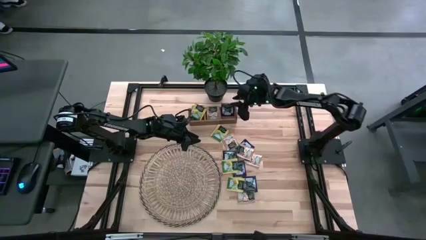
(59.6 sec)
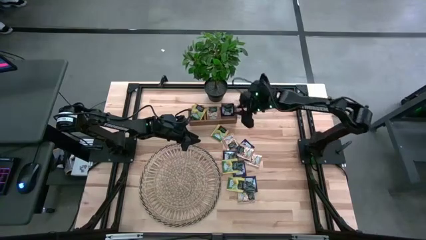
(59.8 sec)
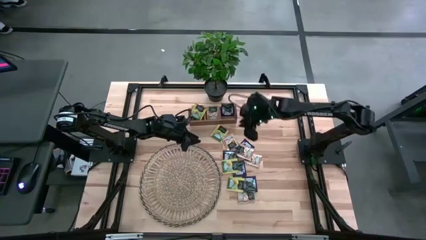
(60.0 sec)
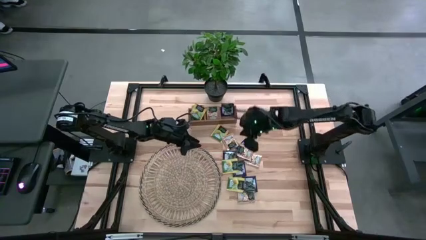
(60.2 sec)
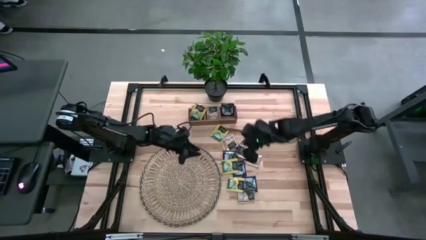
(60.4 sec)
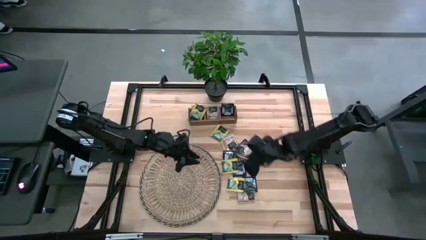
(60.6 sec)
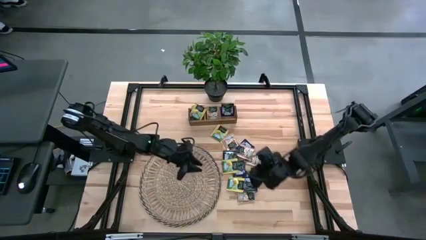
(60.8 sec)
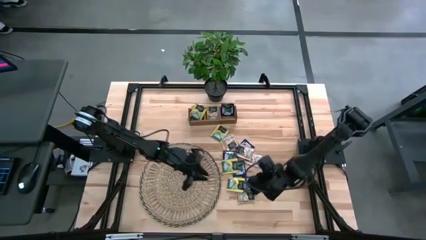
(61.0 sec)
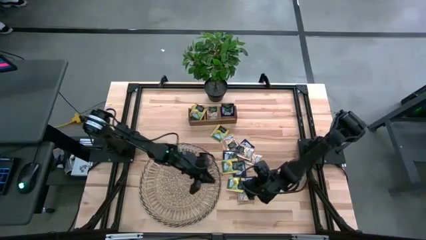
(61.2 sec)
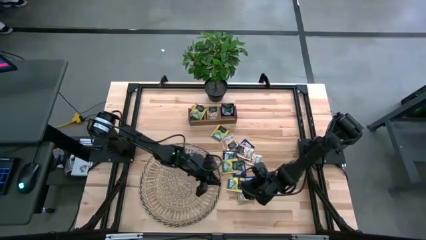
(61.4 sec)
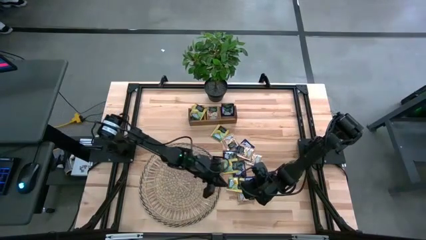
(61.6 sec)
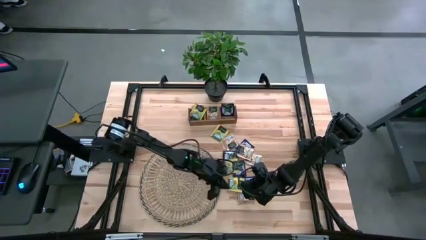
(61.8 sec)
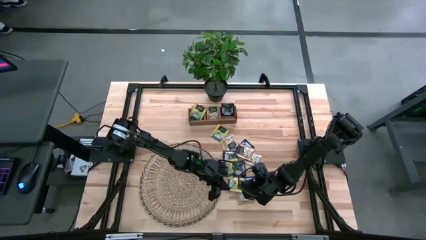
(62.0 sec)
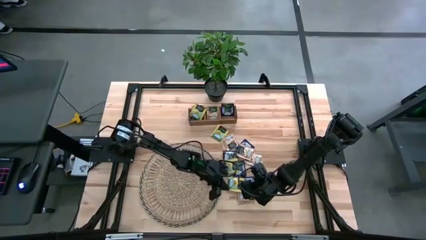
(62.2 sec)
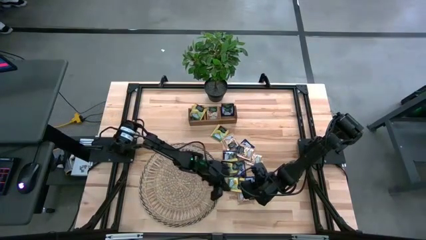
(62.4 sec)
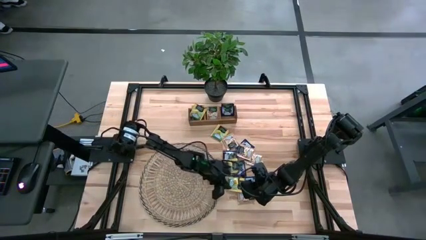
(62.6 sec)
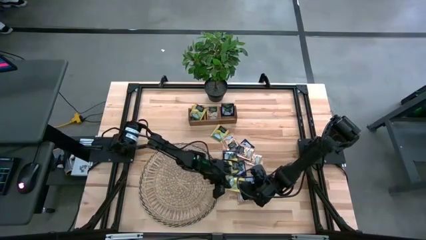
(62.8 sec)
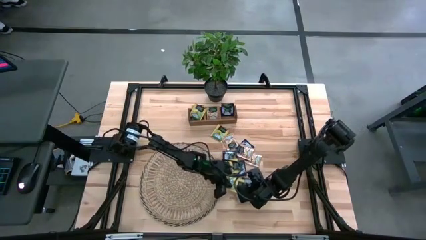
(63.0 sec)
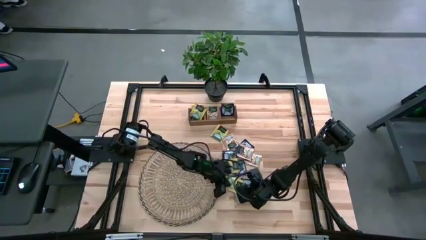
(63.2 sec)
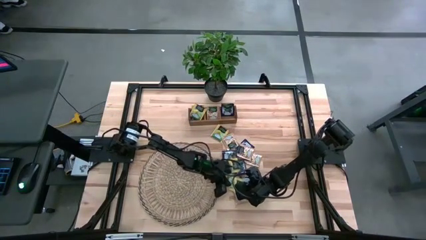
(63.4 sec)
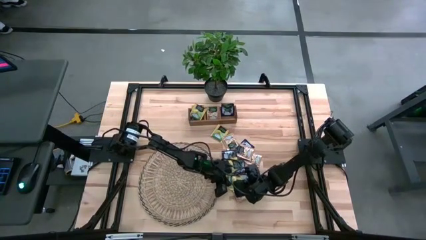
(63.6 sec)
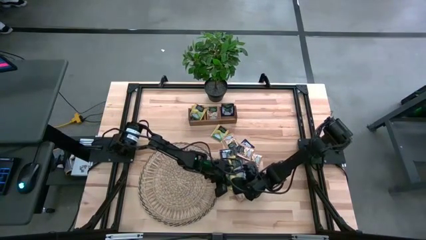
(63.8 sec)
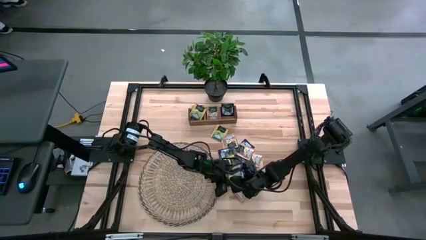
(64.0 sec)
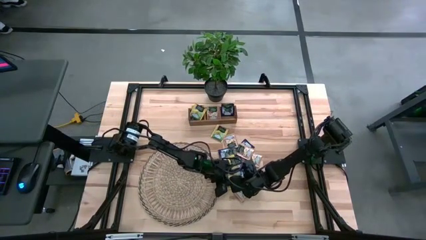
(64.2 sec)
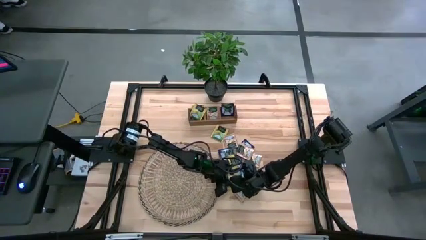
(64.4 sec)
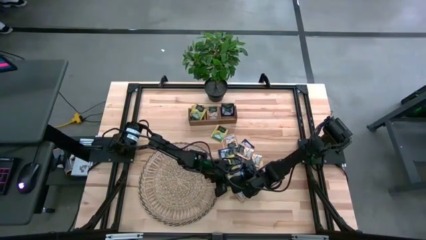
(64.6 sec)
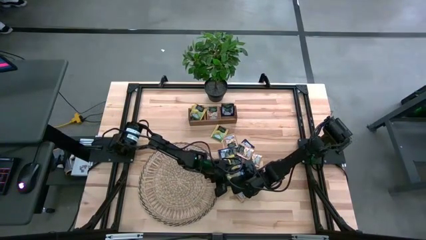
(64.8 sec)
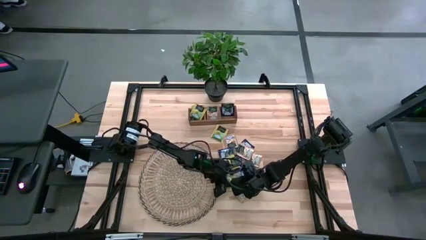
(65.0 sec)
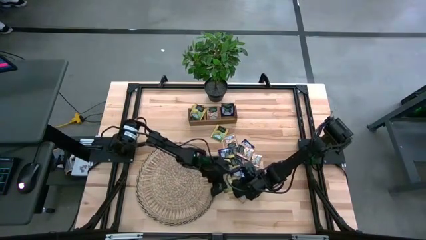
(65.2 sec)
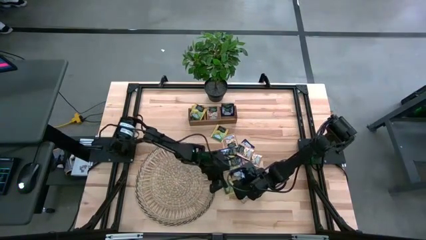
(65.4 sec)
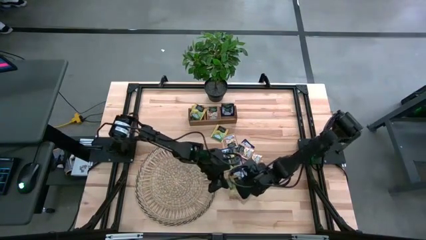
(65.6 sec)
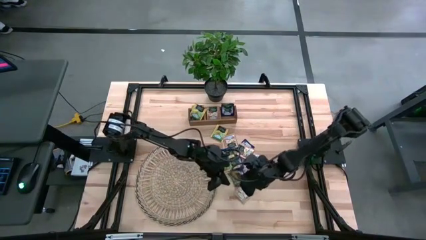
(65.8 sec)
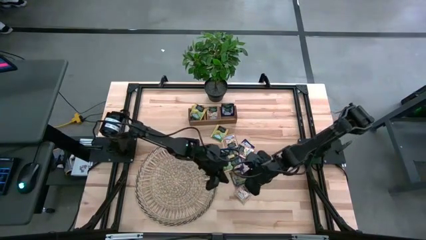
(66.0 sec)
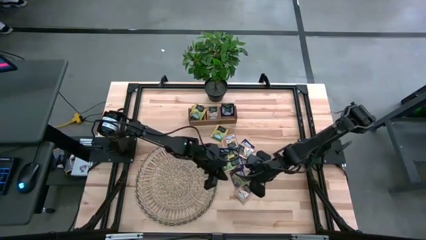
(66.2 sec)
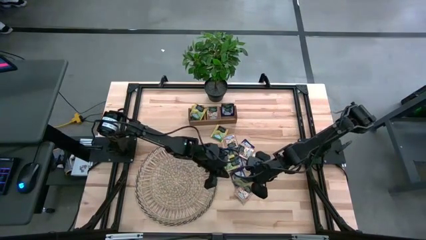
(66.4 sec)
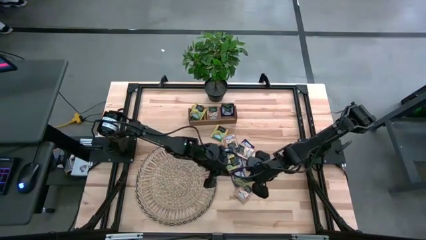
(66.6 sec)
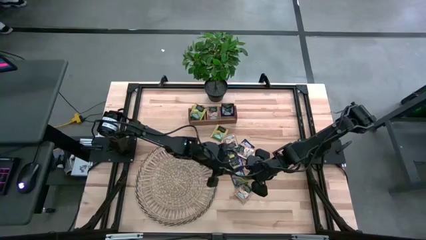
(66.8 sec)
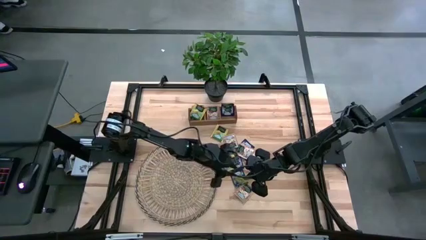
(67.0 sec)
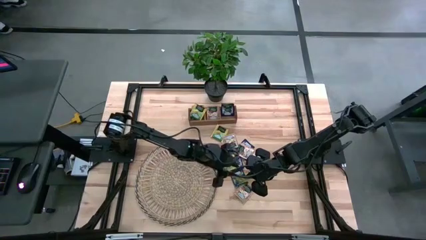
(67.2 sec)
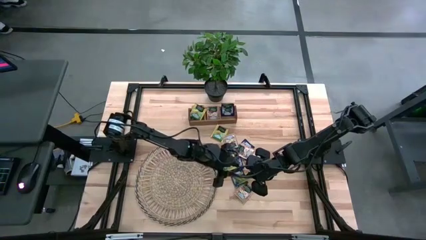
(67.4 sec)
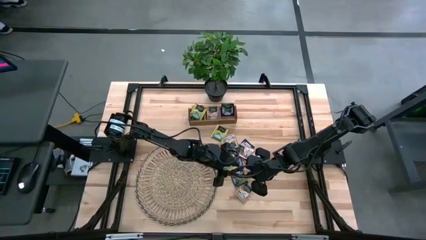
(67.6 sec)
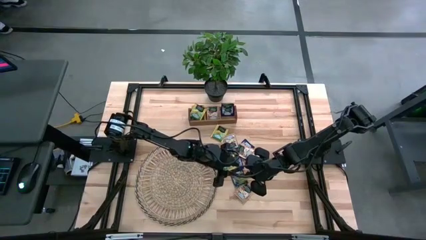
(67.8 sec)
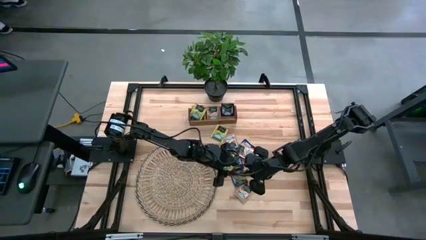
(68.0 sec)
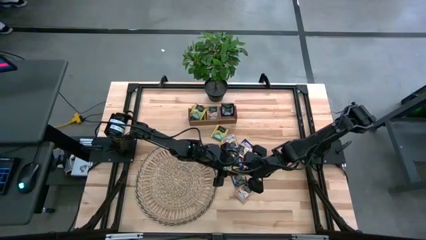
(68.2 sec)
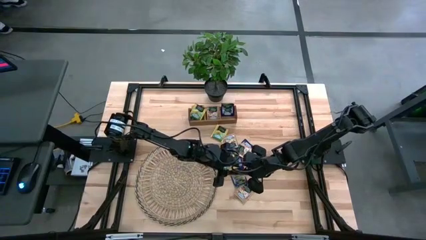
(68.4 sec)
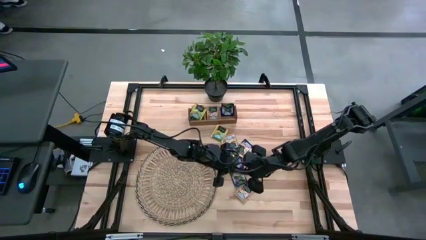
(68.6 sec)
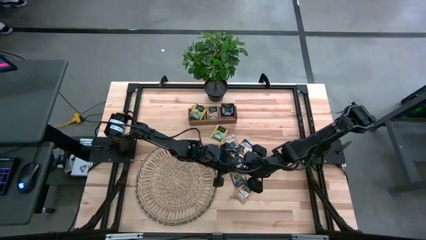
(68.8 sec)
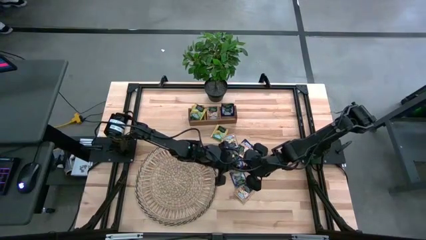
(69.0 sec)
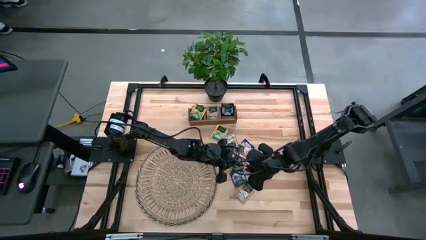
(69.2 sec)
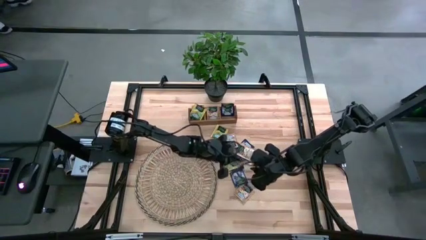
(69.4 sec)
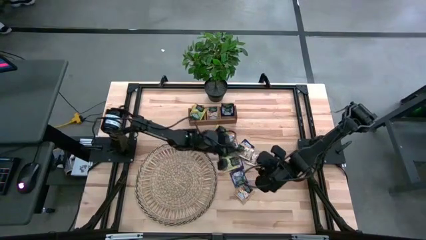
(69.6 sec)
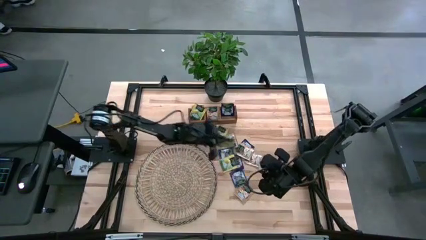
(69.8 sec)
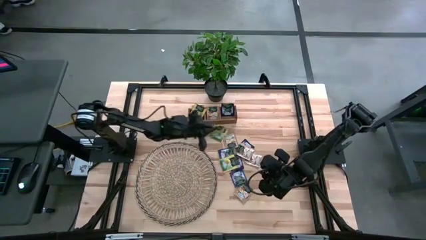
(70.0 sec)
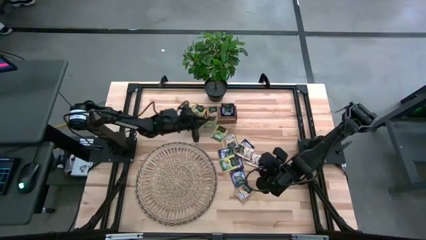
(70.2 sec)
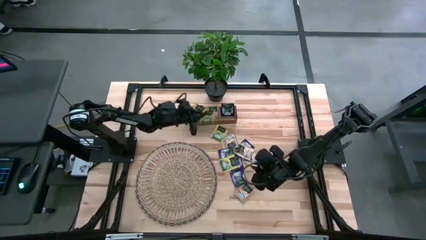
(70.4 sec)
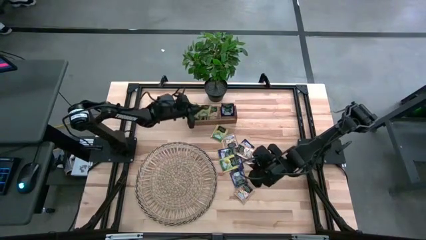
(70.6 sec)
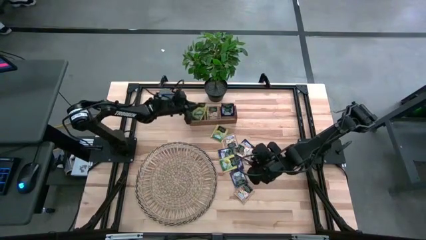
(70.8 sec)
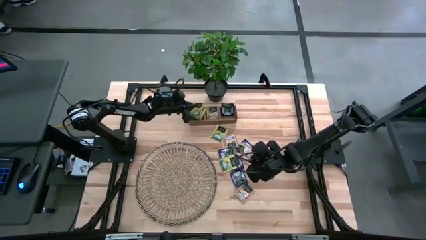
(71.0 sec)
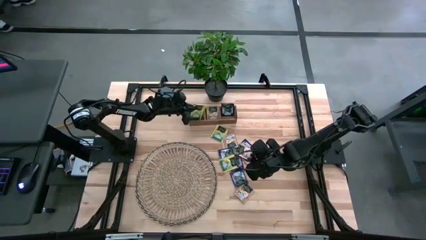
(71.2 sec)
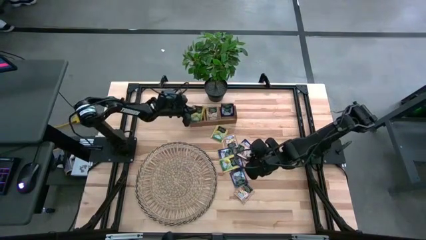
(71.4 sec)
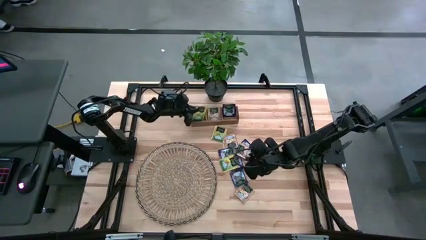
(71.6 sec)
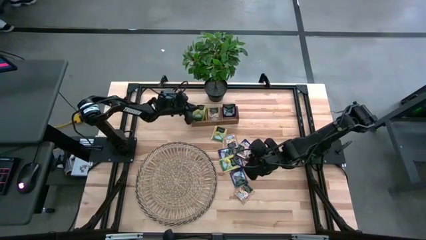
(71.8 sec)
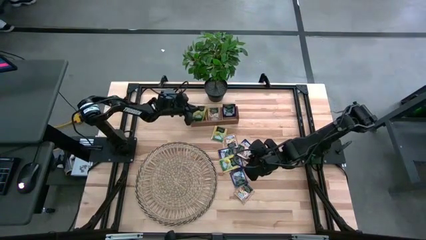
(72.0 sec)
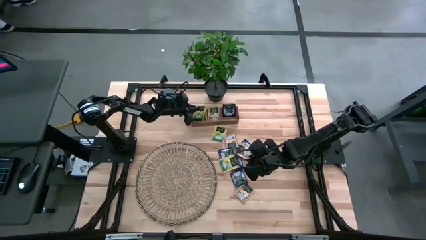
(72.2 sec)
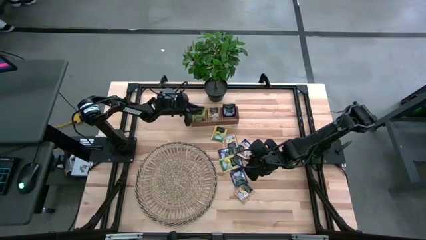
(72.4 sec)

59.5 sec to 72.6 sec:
Task: Pick & Place Tea
Put the yellow tea bag into the left section of the wooden organizer
